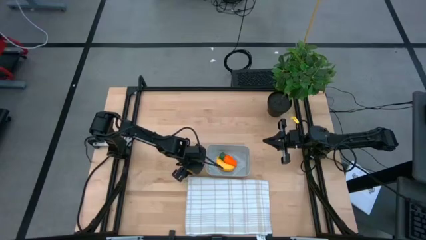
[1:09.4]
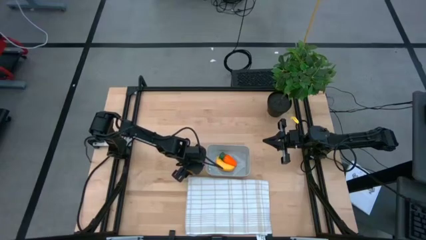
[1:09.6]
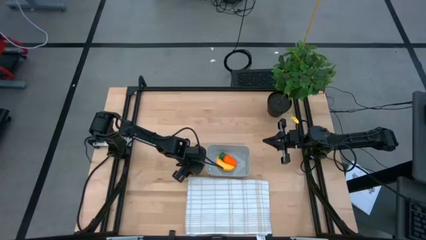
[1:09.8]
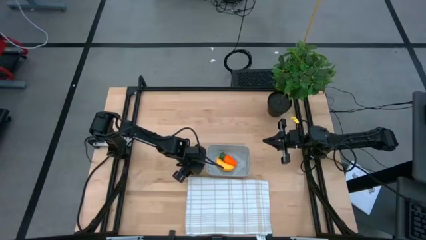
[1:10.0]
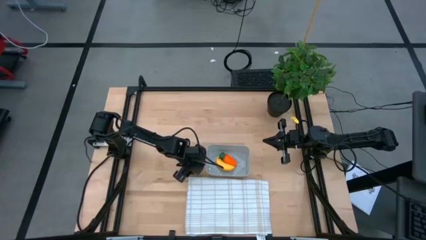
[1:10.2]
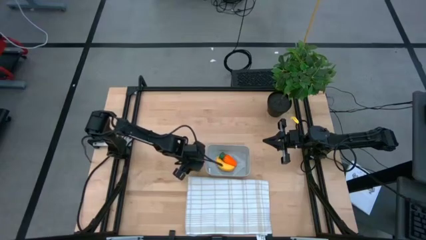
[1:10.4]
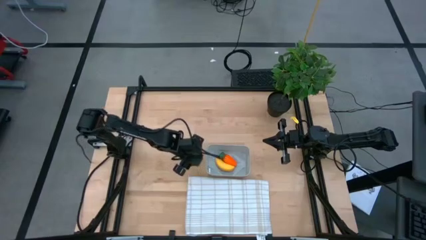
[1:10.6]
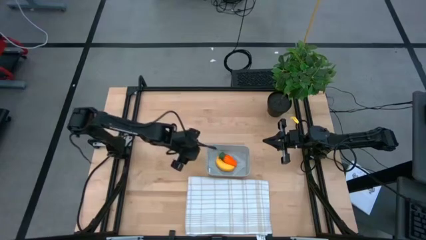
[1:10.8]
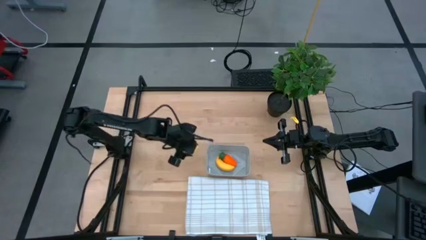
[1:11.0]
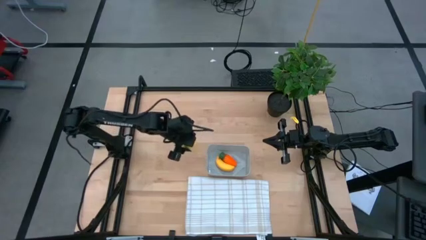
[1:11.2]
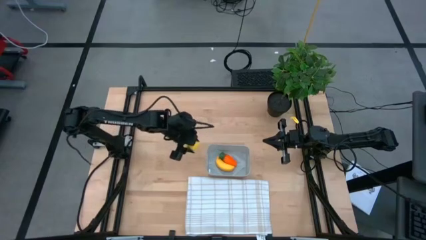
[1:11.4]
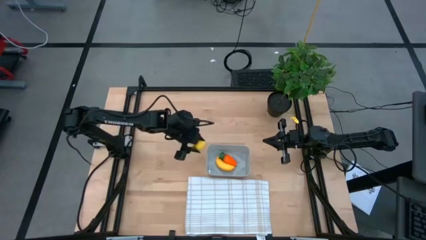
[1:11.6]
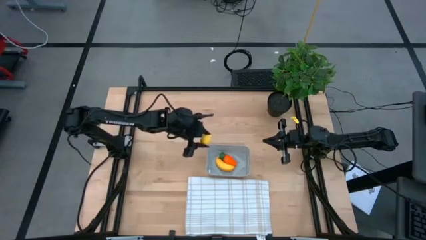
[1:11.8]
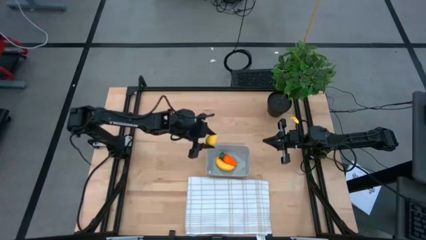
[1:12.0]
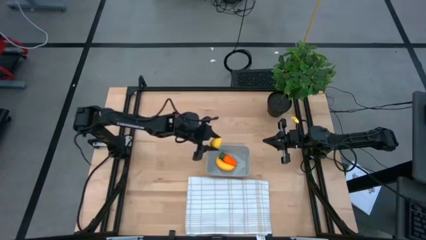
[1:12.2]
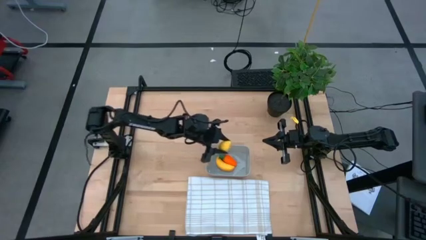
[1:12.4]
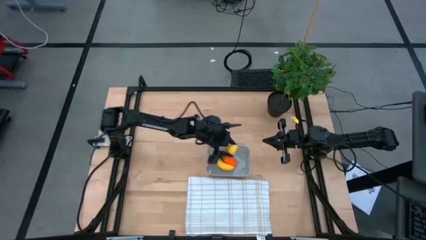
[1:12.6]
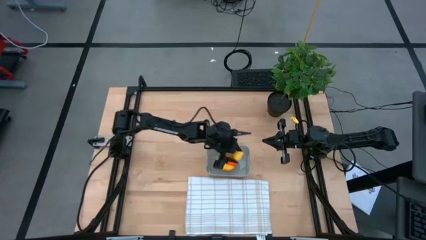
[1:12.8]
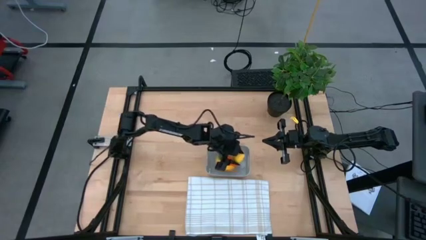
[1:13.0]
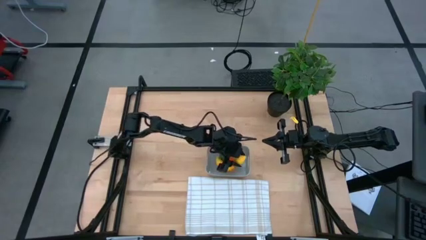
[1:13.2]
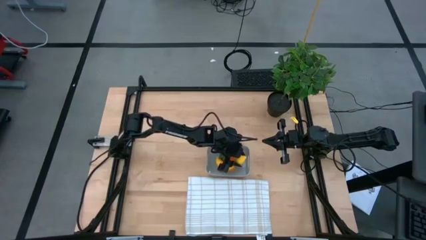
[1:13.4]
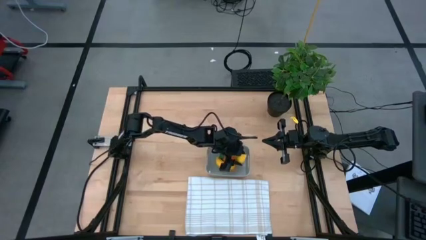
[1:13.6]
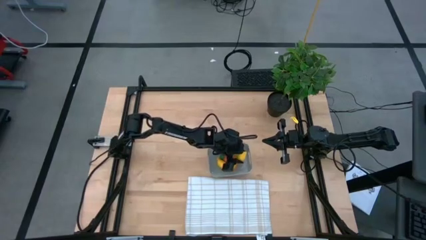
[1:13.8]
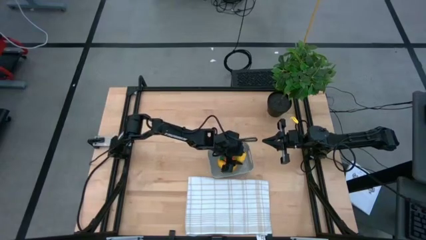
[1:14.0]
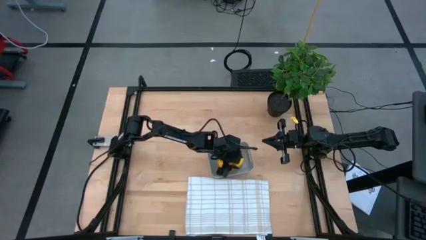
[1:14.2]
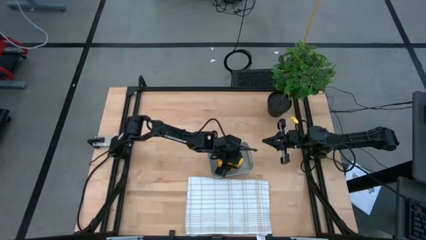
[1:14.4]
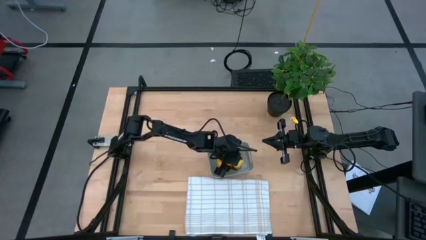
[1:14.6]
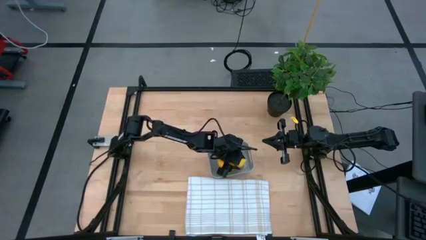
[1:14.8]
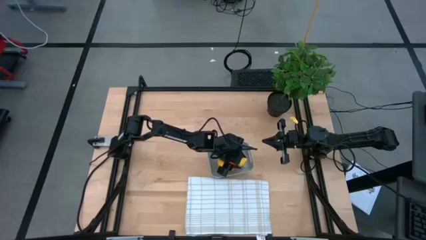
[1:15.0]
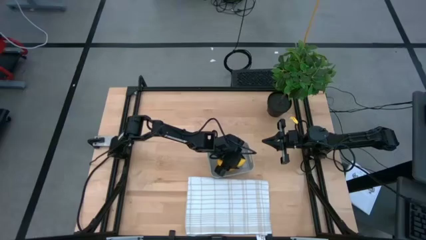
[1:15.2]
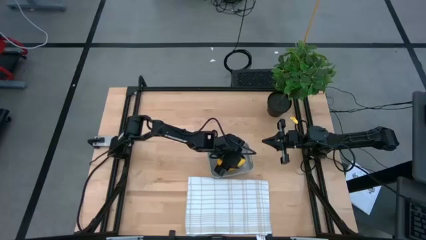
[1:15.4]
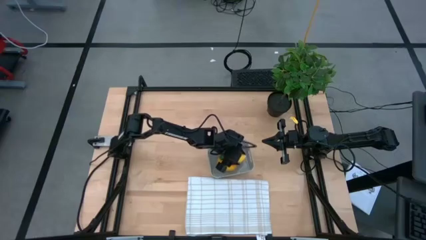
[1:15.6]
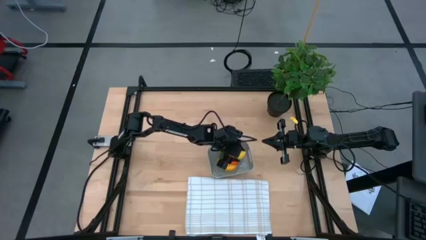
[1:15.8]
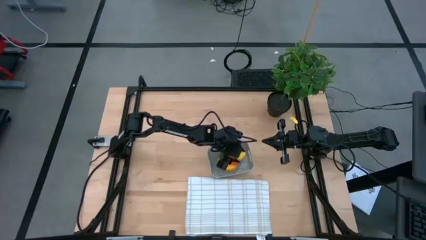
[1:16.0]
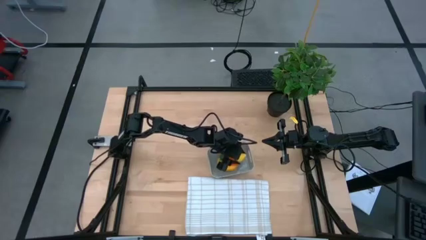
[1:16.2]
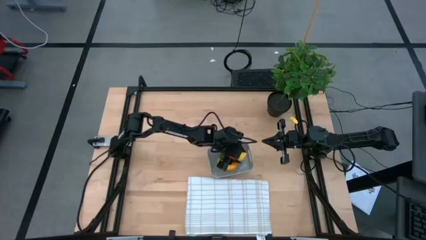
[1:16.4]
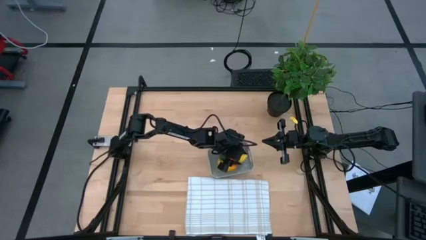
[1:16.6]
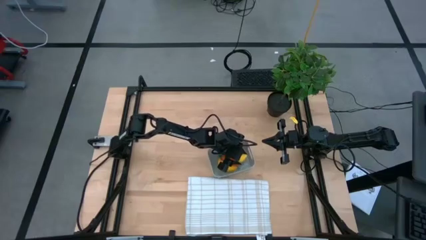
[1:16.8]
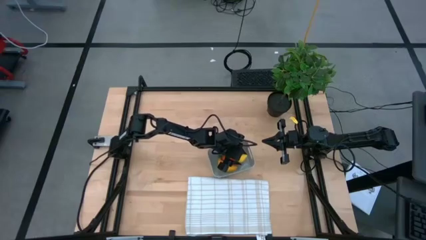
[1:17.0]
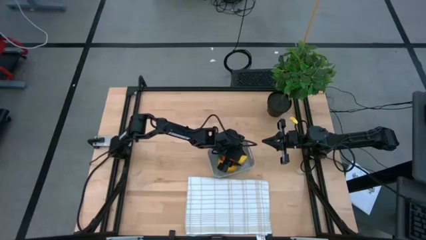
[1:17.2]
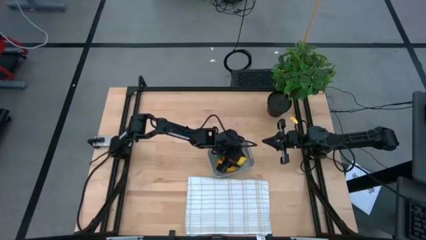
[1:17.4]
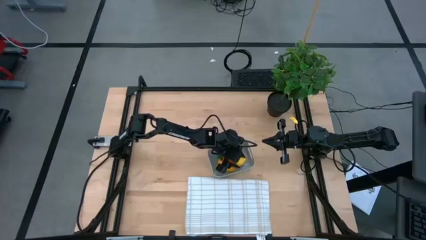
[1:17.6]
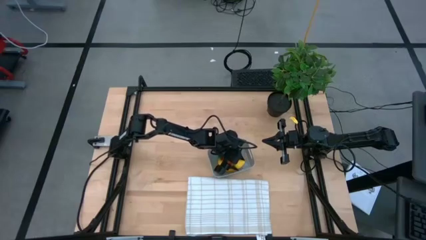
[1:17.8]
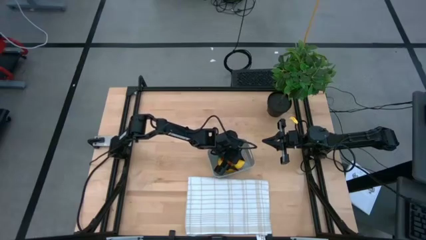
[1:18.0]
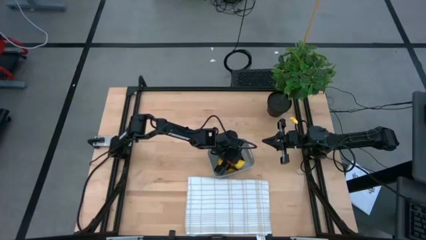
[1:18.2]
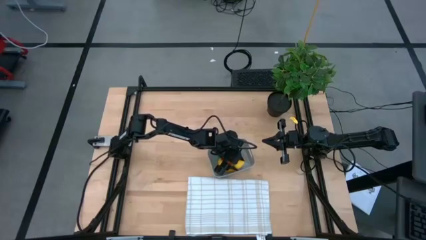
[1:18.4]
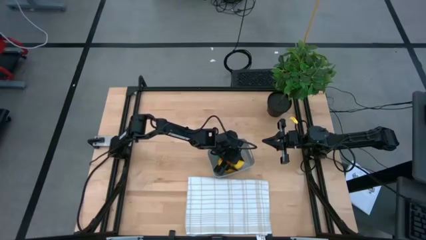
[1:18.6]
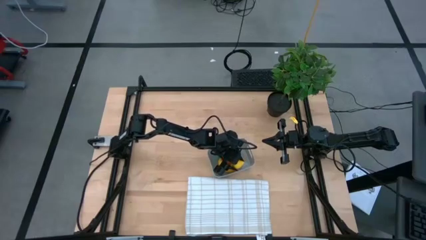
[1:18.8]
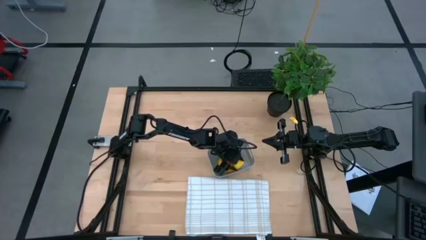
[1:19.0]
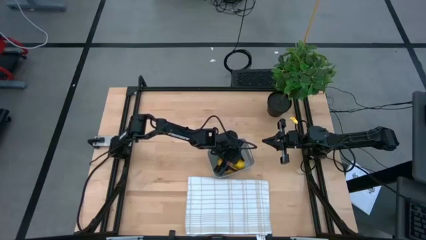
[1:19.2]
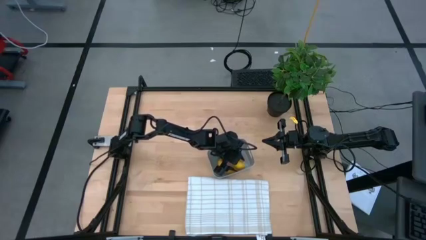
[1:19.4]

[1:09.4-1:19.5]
Task: Pick and placing Produce into tupperware
Put the yellow lemon into the gray bin

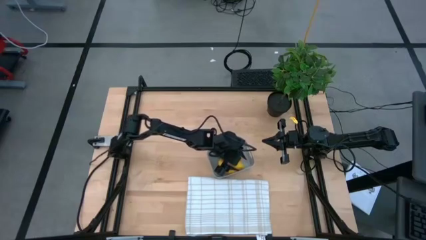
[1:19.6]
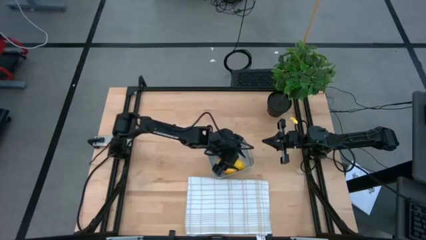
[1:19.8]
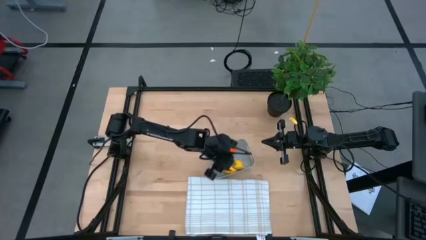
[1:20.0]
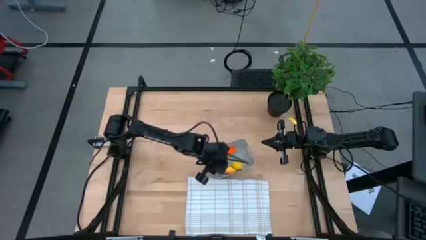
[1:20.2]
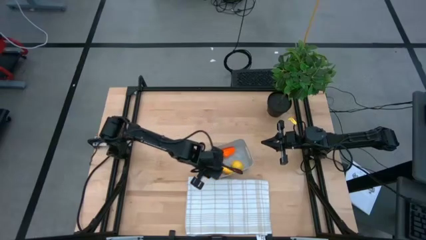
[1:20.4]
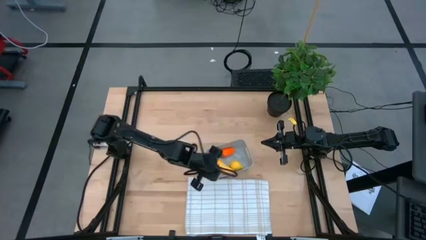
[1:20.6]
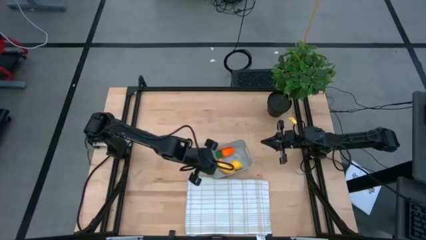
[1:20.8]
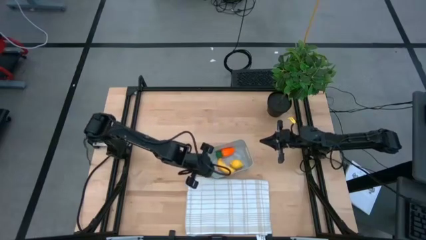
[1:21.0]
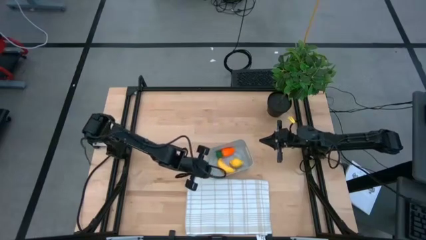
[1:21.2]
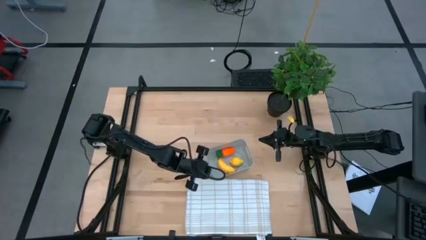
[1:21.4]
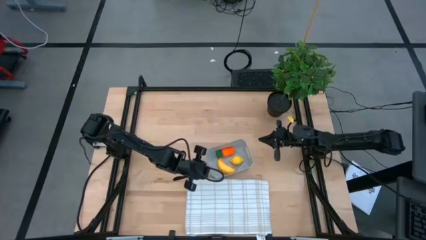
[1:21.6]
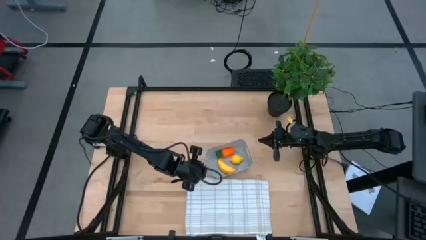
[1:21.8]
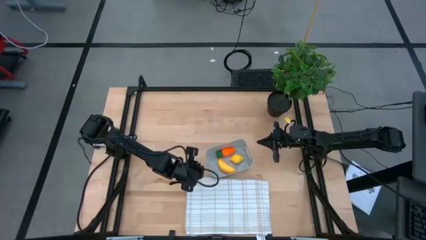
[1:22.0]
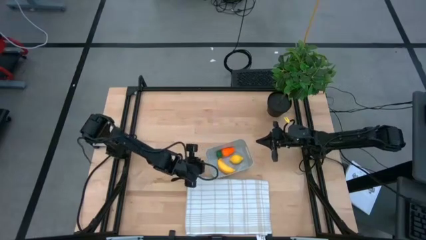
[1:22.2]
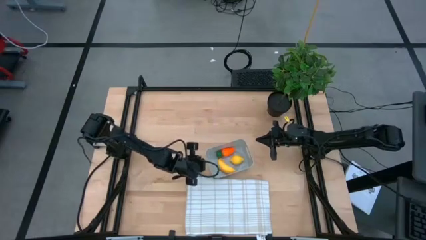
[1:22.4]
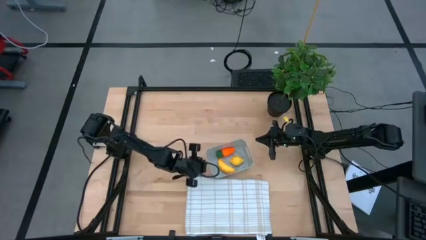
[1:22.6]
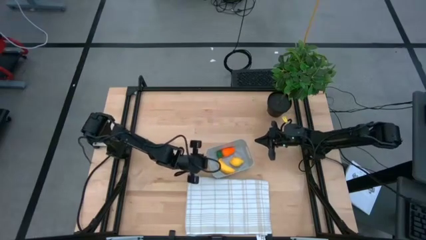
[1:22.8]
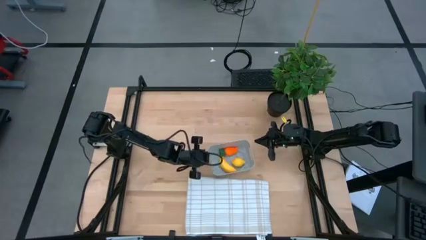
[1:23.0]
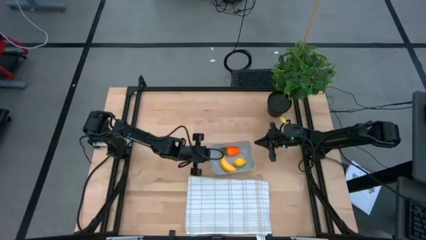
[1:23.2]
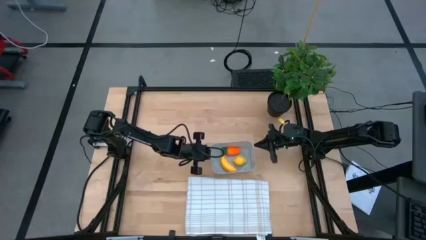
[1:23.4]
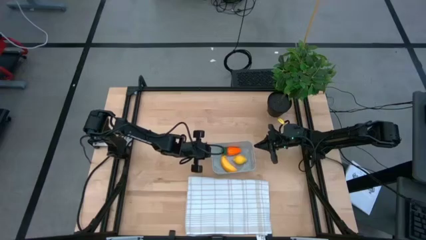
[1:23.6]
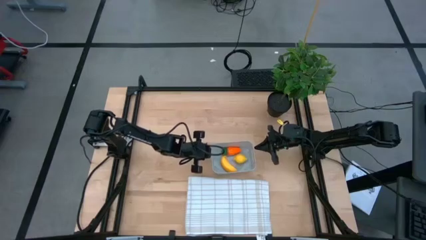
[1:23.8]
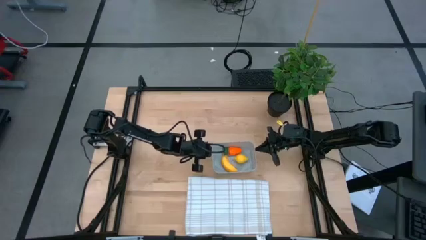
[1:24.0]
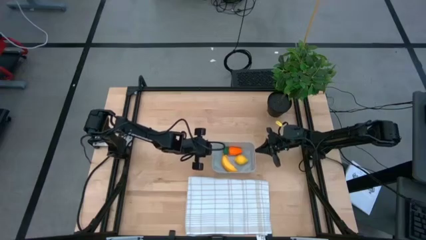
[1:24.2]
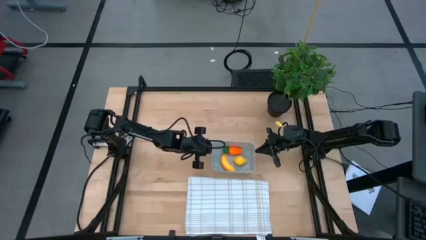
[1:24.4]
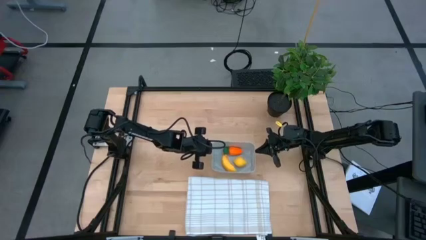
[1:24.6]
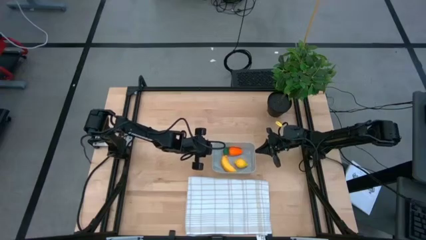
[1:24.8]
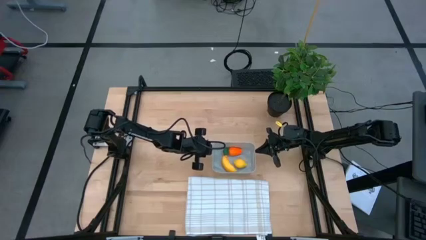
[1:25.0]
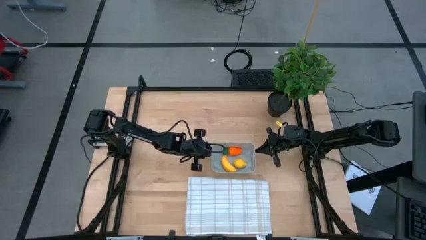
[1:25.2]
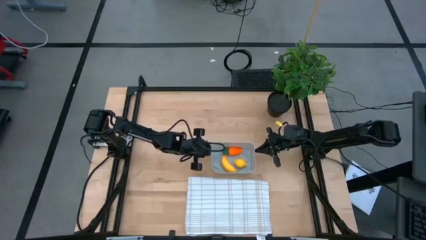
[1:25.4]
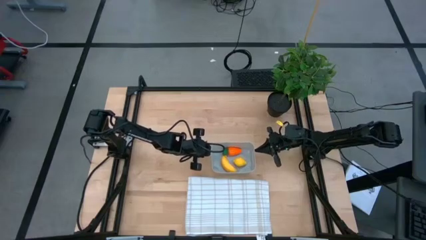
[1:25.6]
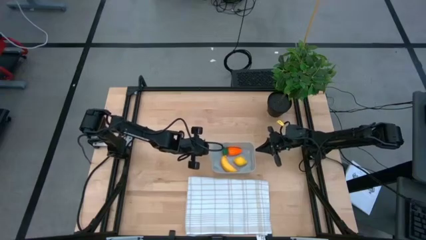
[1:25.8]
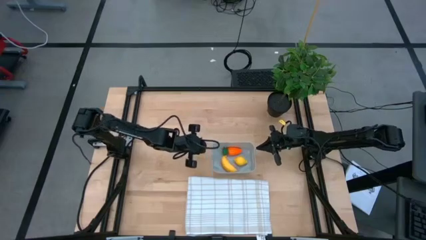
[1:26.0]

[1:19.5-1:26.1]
Adjust the gray bin
